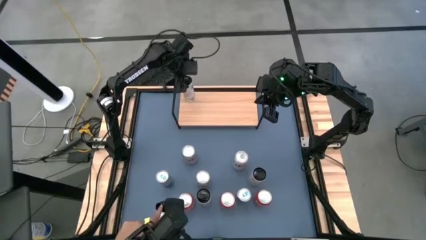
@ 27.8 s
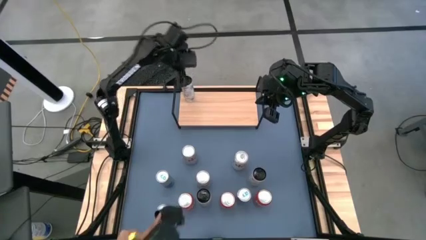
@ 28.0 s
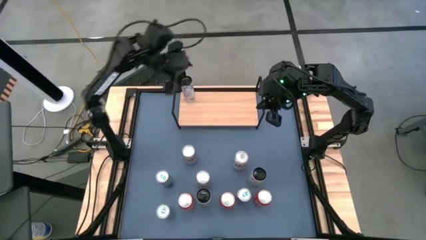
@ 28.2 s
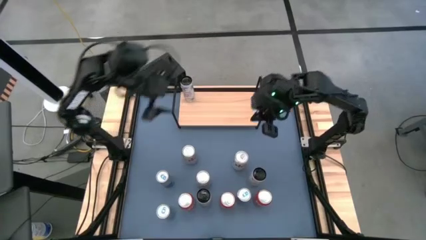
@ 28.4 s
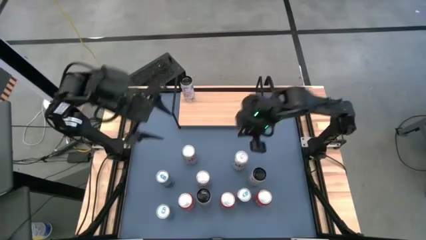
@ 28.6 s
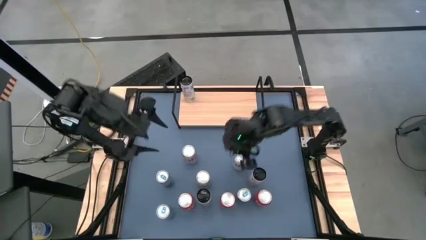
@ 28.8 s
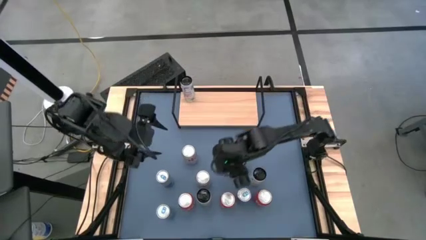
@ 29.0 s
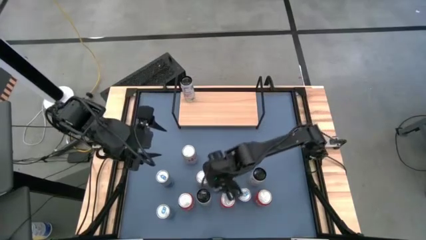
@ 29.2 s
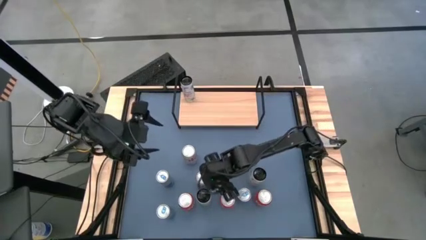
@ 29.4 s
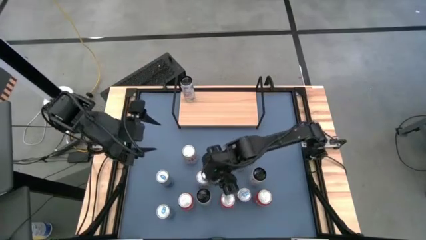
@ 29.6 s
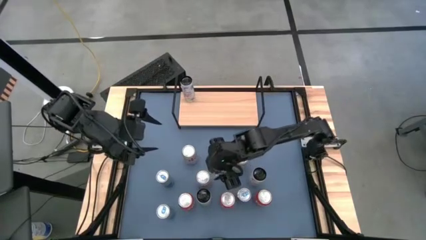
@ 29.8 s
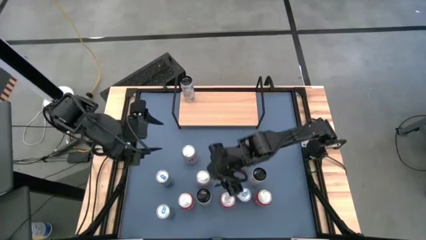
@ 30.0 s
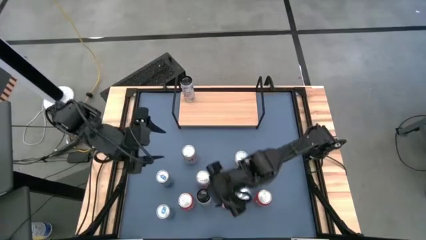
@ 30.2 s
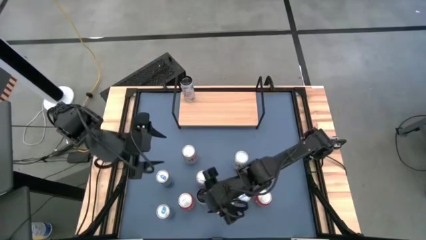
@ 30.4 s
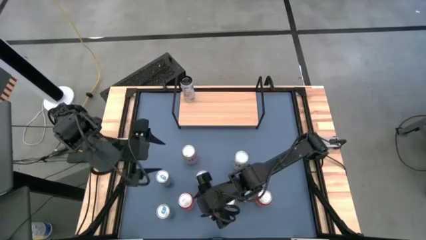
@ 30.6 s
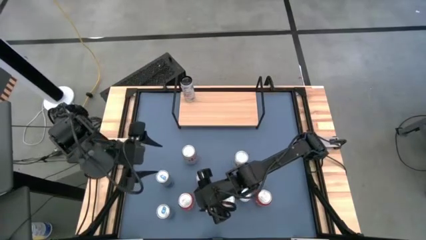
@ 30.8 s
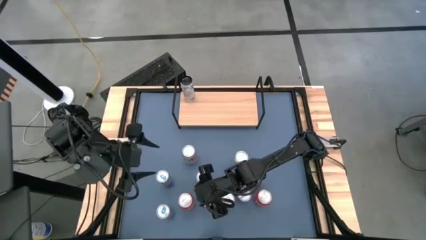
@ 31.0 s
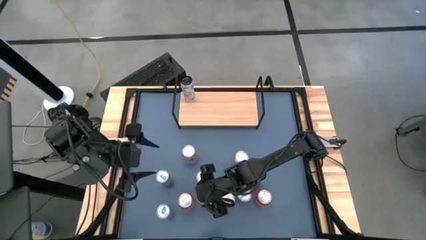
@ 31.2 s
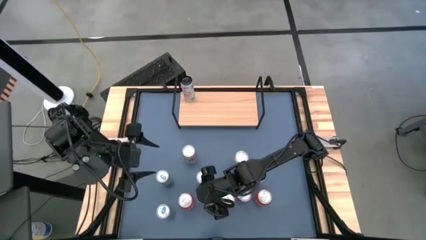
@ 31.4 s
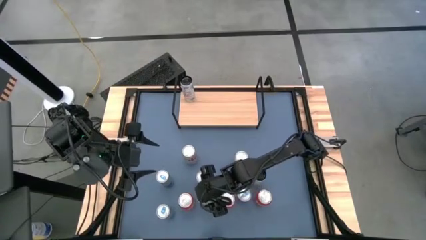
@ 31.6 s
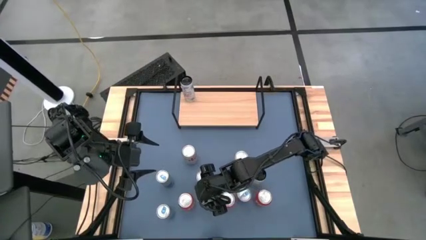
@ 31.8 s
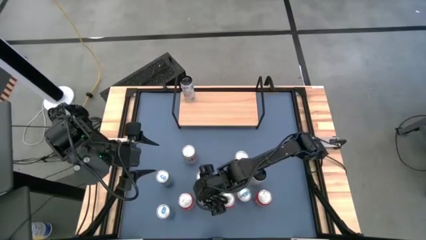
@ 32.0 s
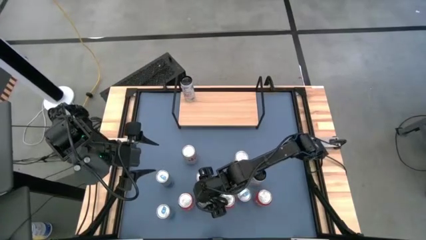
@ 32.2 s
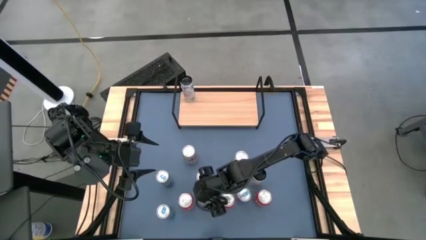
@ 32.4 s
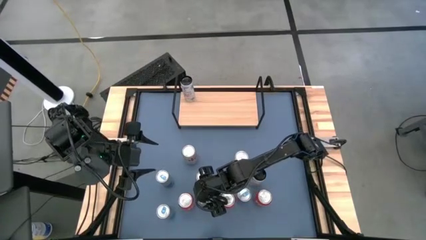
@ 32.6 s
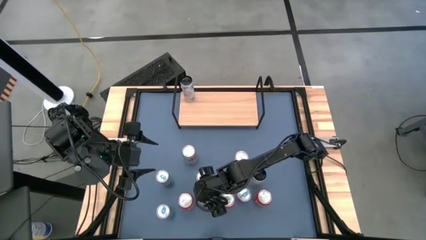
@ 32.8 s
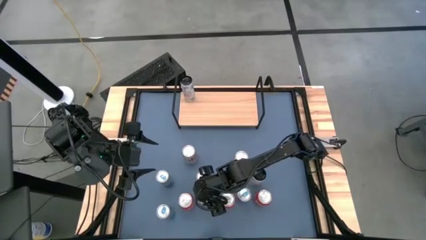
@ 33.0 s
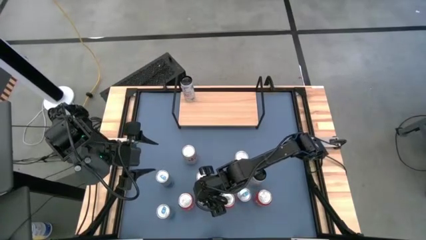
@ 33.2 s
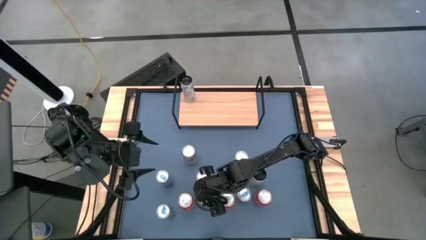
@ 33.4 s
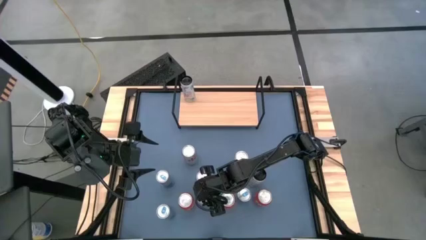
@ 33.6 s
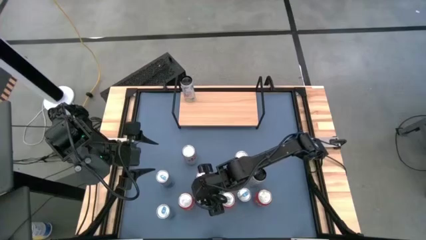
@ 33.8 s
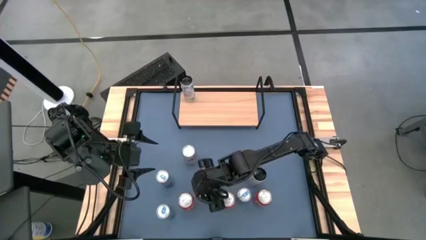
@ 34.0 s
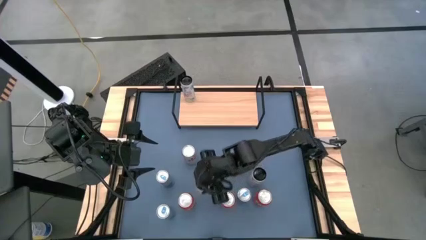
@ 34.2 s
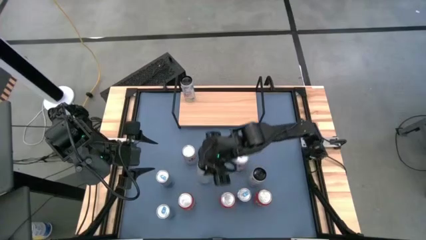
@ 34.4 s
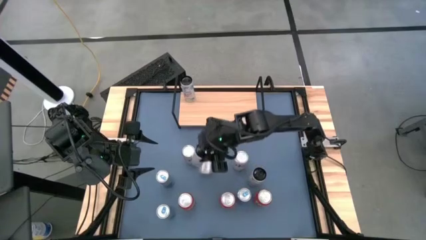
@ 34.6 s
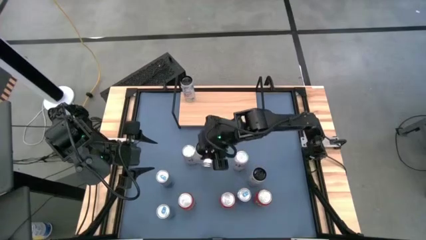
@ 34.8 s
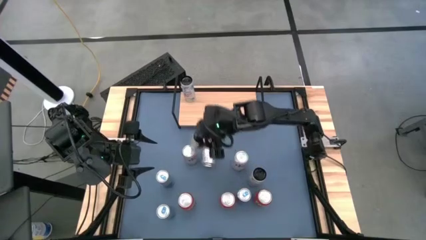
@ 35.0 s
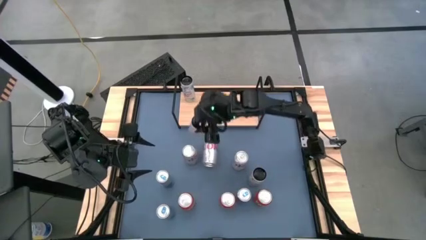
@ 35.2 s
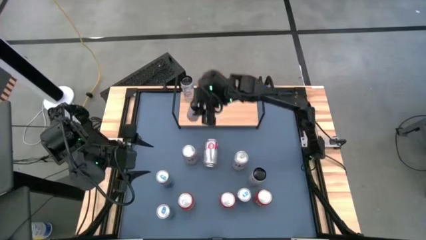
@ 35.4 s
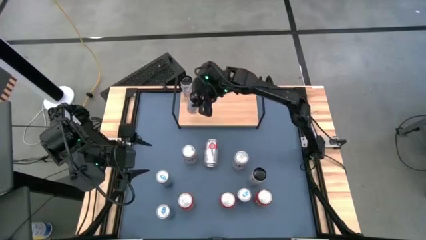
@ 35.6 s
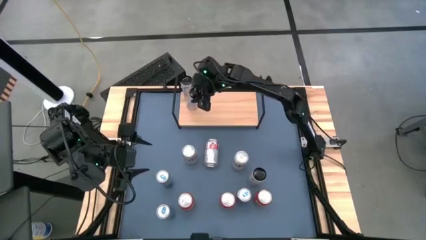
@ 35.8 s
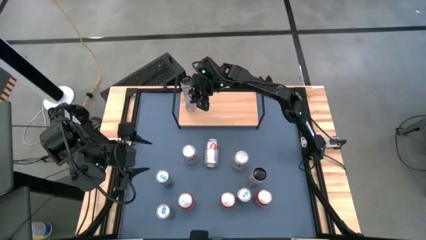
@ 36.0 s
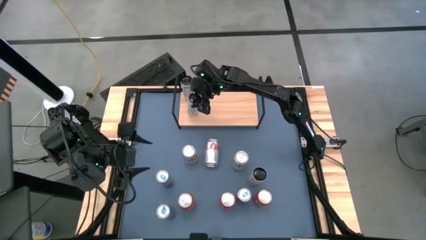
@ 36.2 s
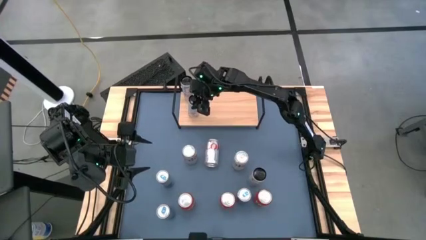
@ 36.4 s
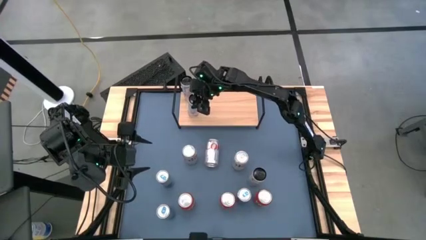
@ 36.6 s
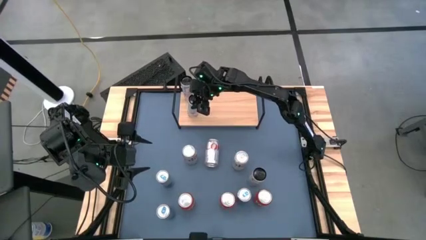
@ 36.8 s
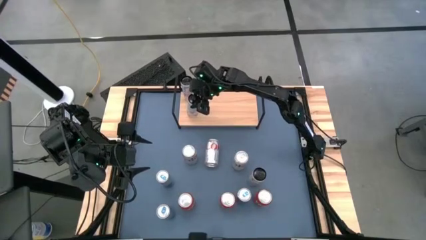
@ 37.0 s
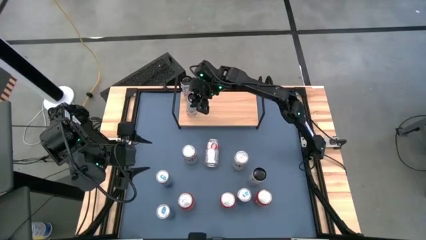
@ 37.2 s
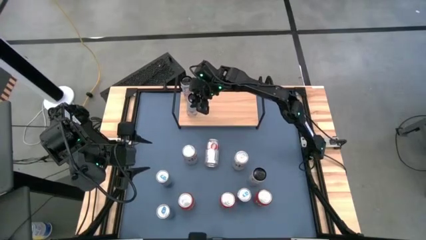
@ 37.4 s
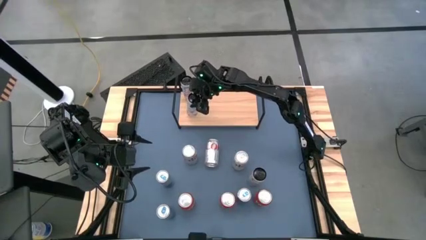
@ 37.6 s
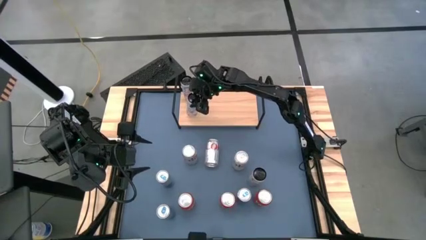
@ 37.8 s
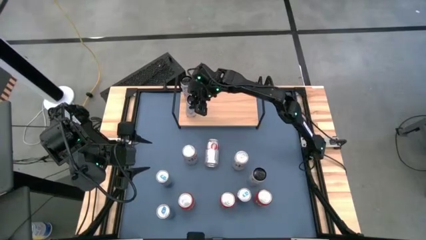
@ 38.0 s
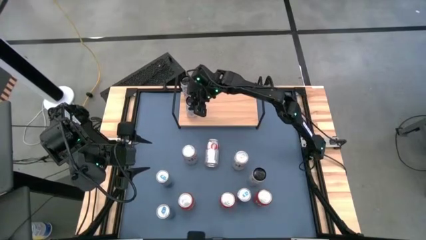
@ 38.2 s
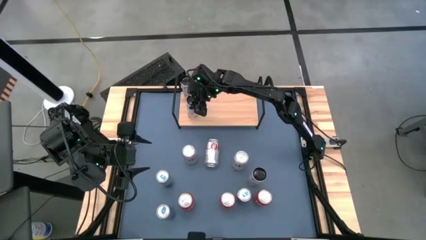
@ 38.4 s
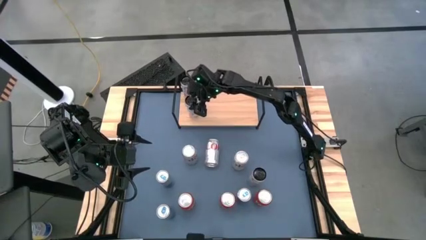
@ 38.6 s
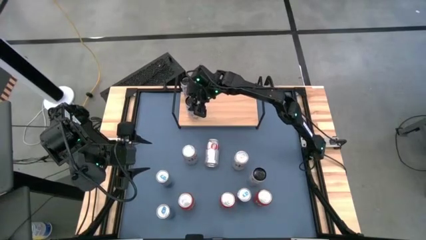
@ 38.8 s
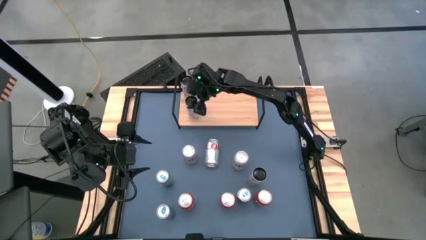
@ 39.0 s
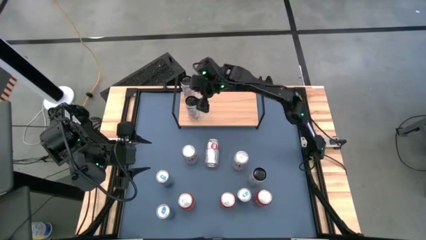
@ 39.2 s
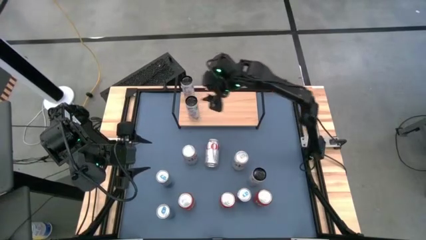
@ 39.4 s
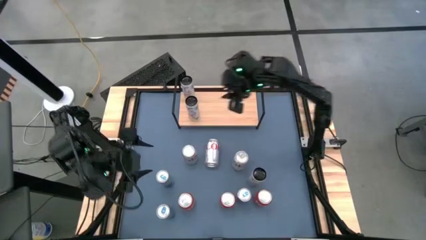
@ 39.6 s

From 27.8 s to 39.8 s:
Task: Place canned beverage on shelf
Put the bottom white and pink soda can aligned with the other white and pink soda can on the shelf

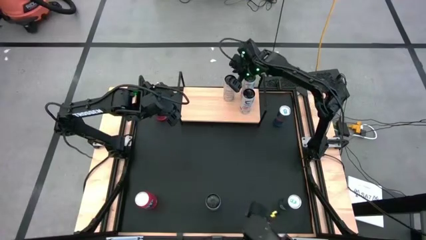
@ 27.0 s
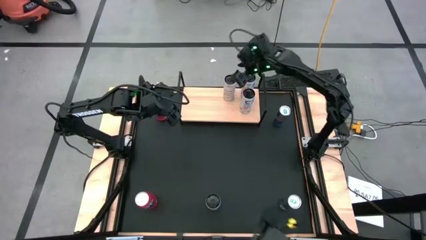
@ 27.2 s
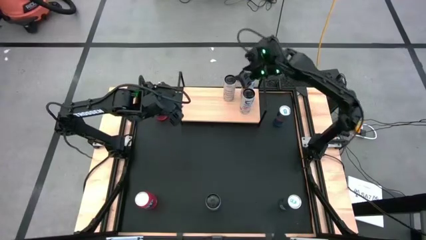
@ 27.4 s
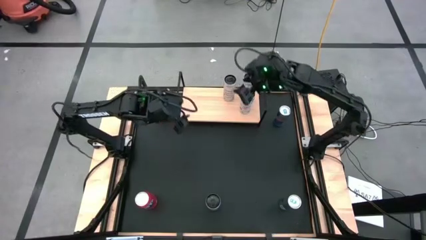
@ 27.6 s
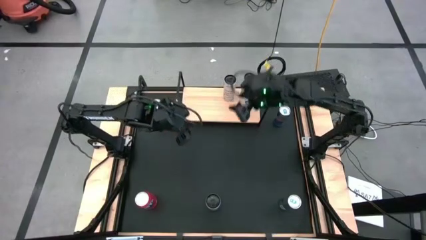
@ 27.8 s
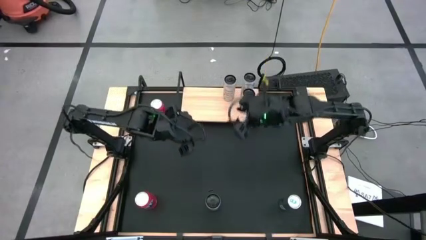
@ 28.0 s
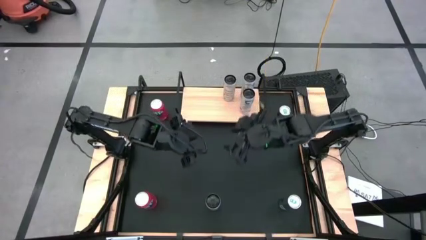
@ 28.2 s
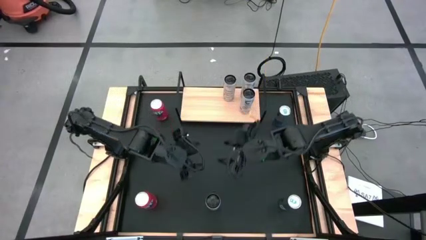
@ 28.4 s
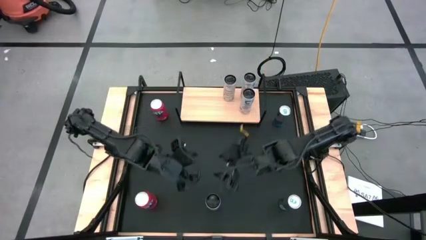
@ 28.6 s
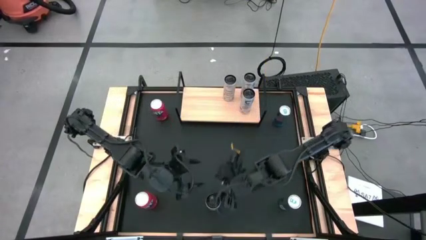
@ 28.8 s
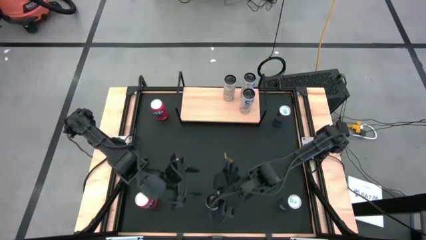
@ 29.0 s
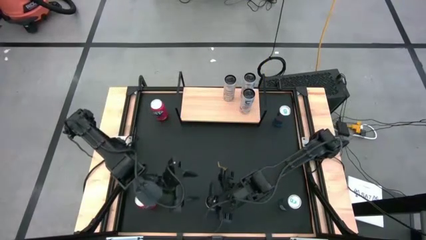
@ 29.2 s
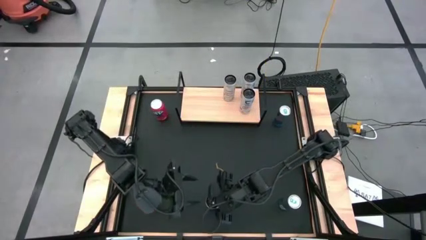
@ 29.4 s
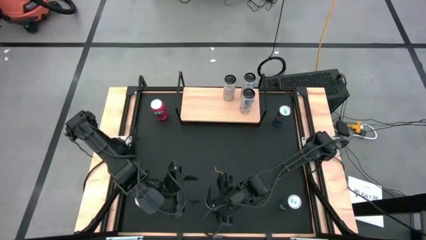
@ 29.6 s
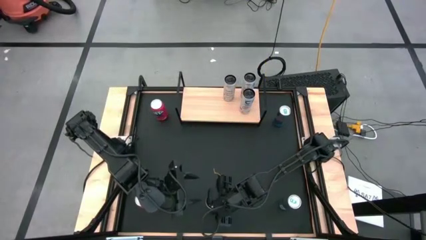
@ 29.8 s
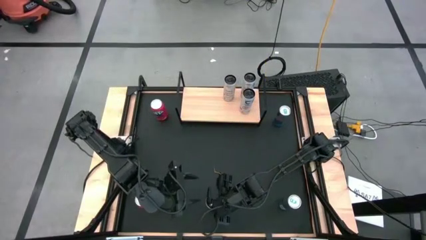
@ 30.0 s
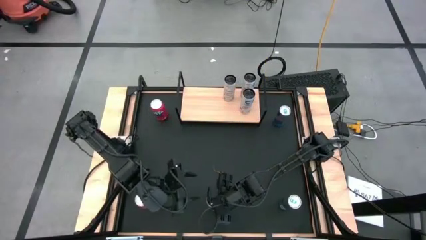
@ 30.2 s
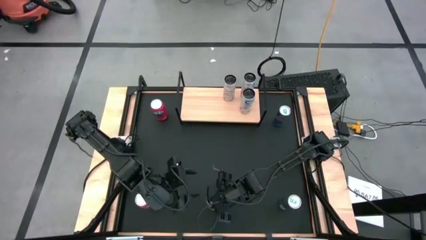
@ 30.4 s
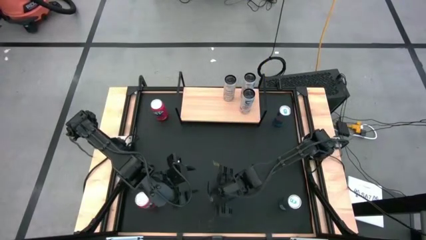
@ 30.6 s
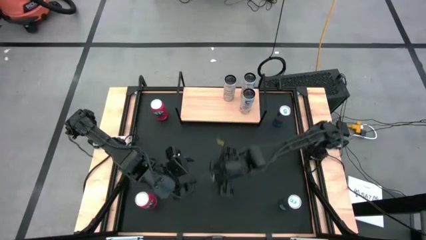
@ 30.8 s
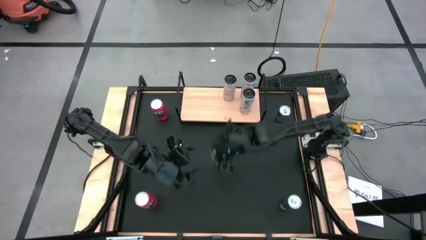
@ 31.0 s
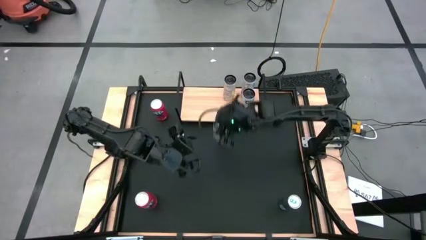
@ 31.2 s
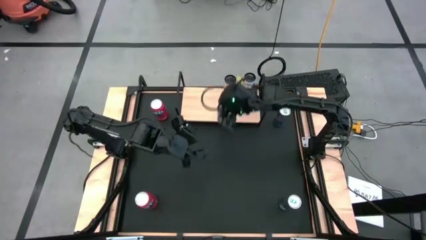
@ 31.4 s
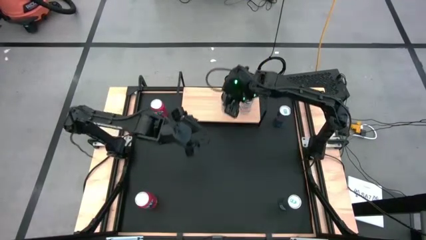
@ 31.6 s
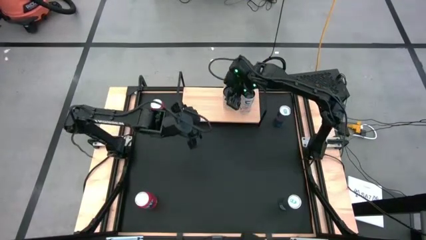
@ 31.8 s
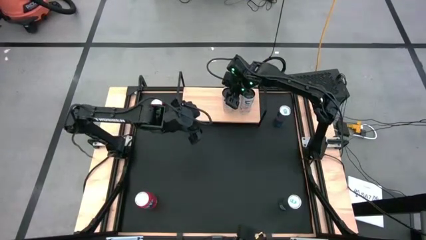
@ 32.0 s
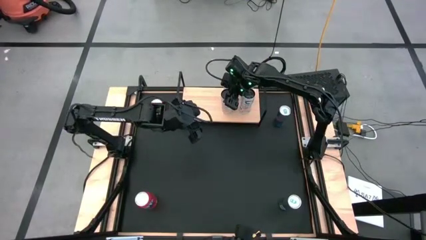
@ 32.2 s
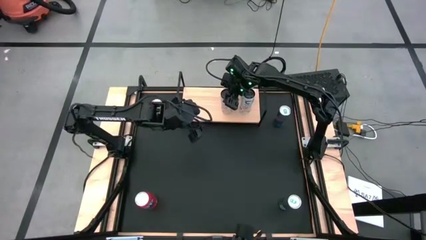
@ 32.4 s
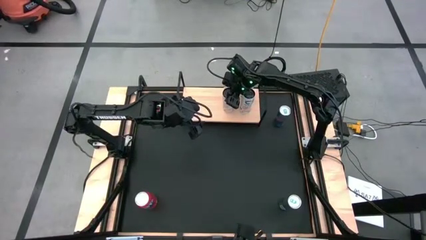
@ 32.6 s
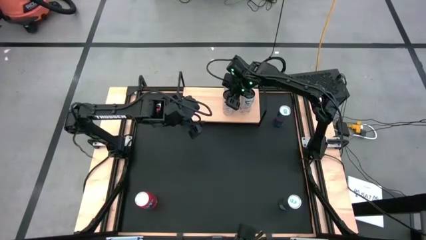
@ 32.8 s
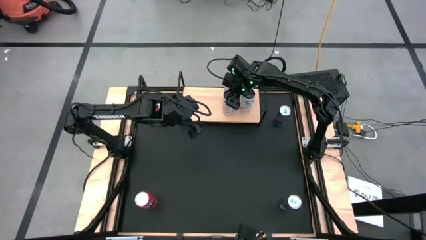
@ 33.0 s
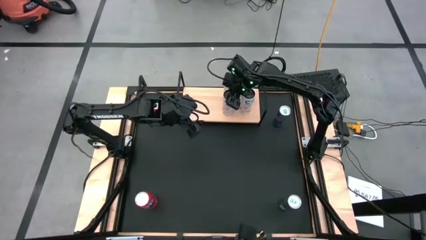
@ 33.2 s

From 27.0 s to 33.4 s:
Task: Place canned beverage on shelf
Put the white soda can on the shelf
